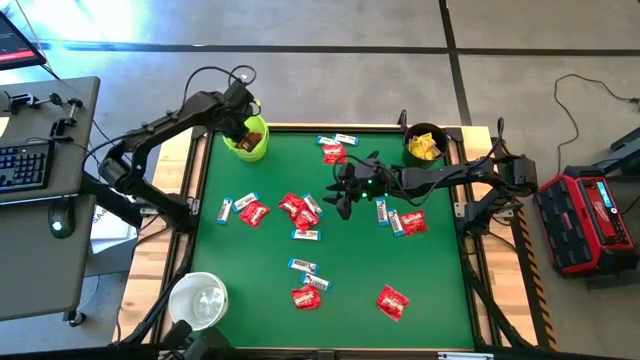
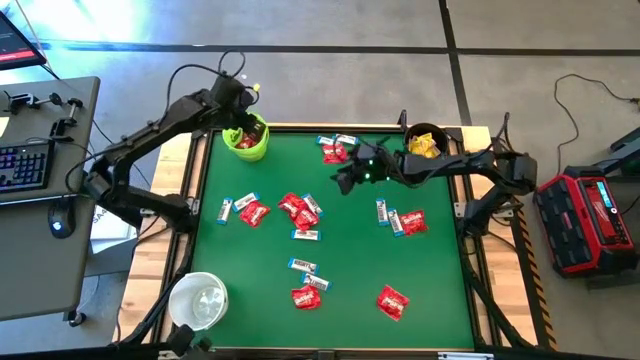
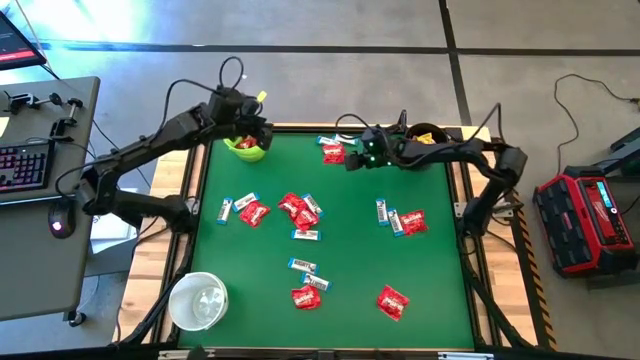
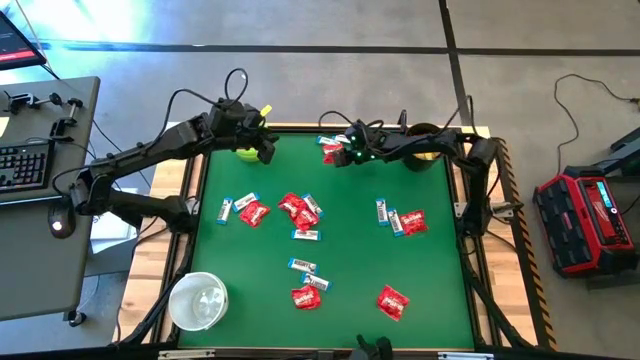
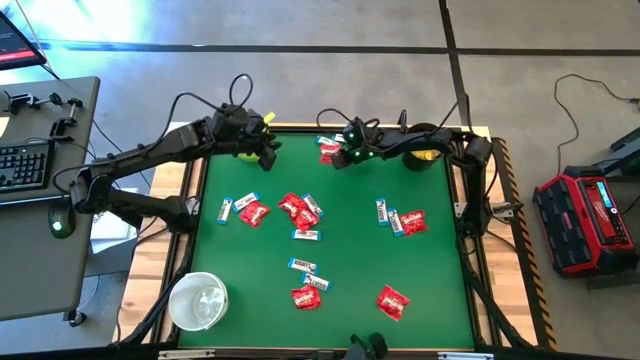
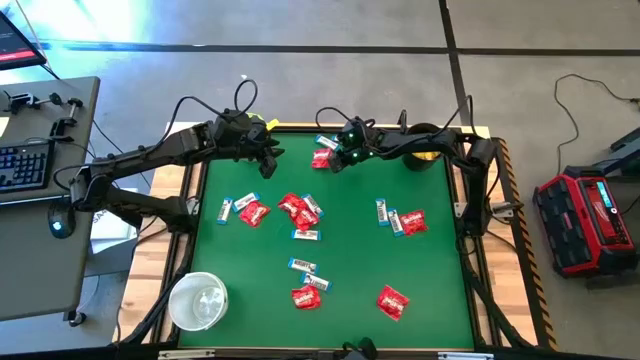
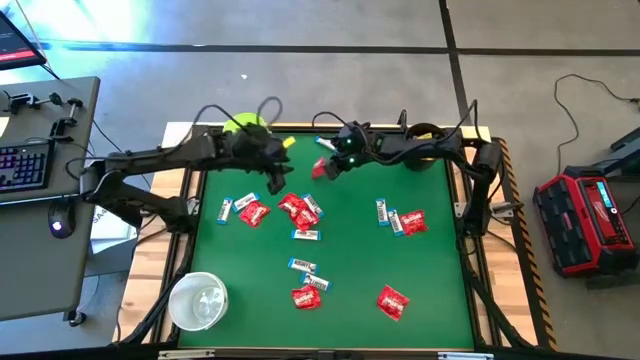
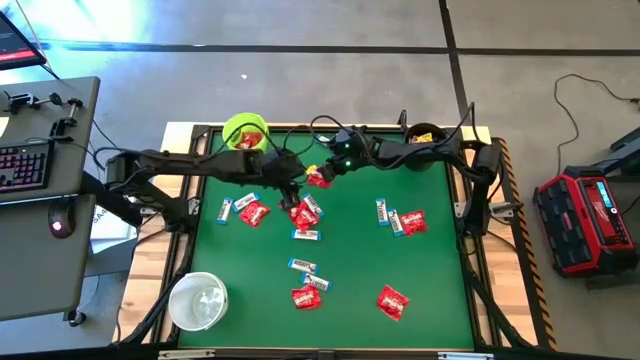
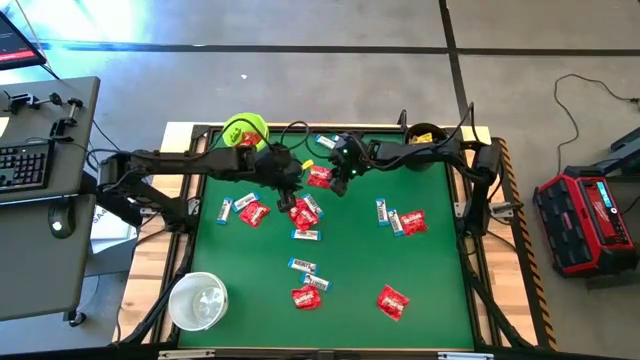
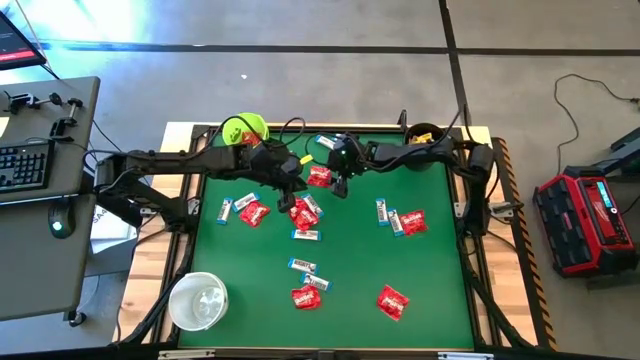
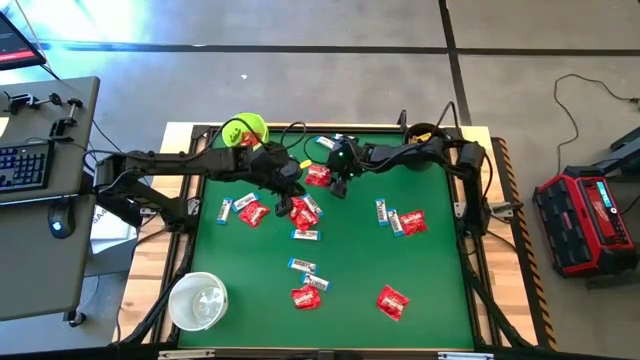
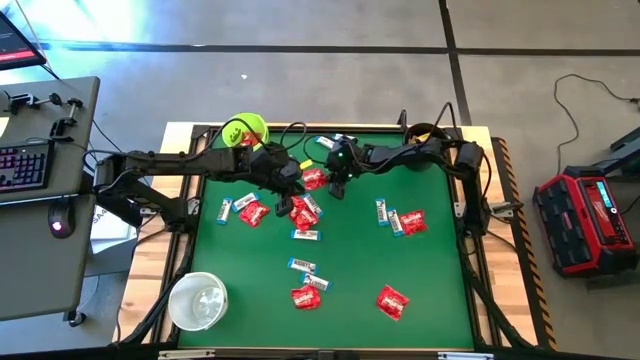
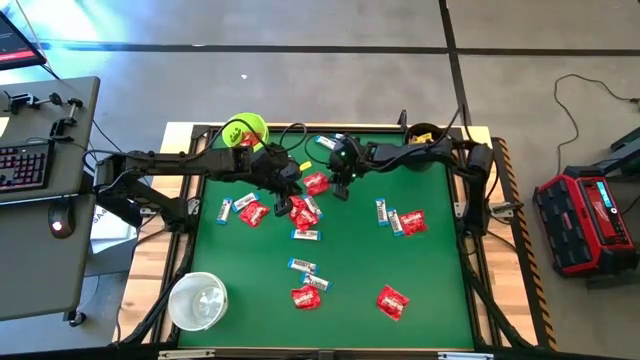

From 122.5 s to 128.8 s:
Task: Sort candy by brand, put in halloween buckets
Put the red candy into the green bucket

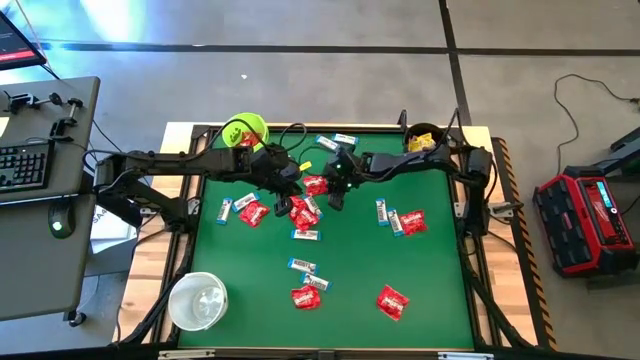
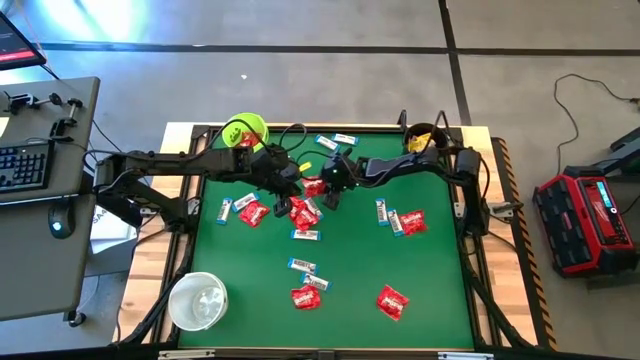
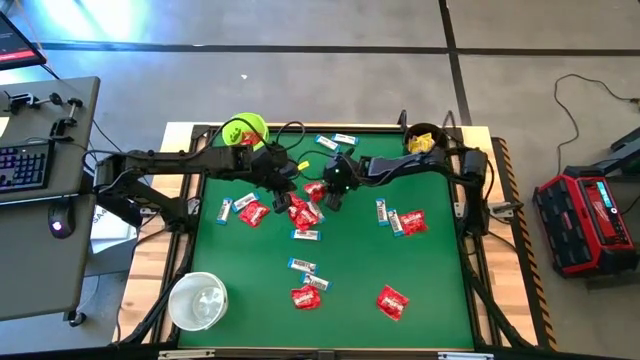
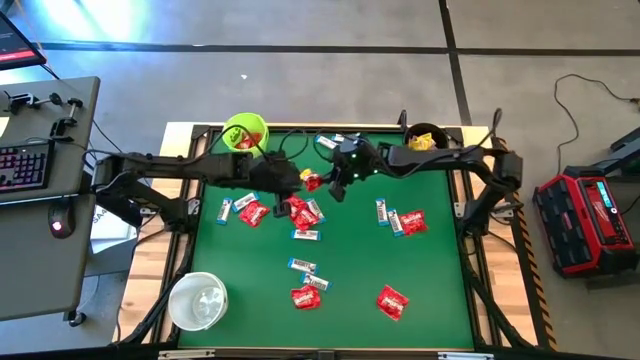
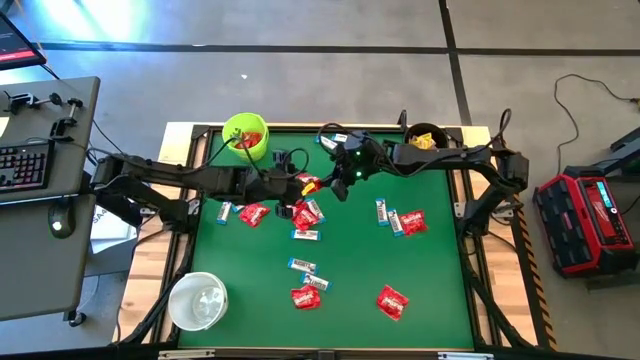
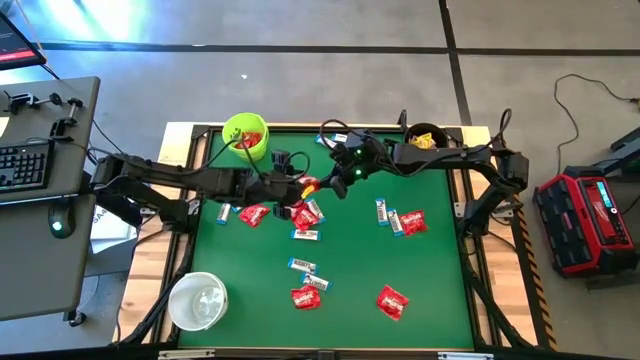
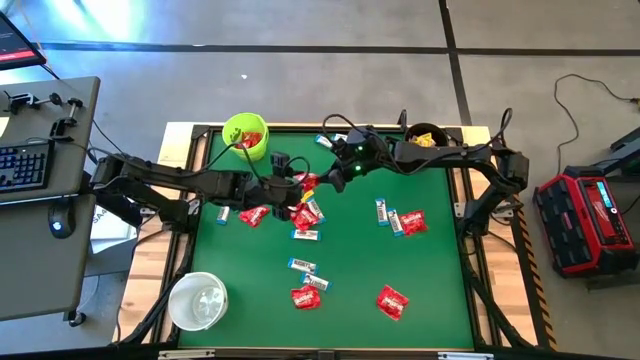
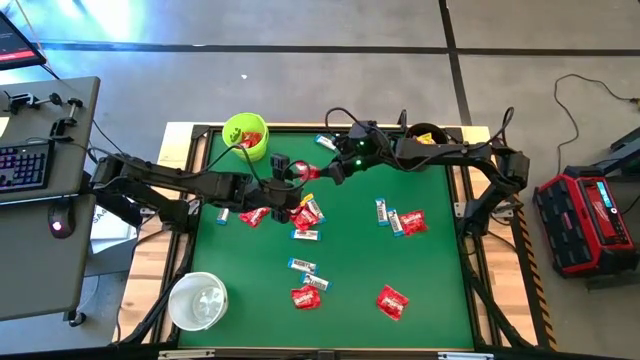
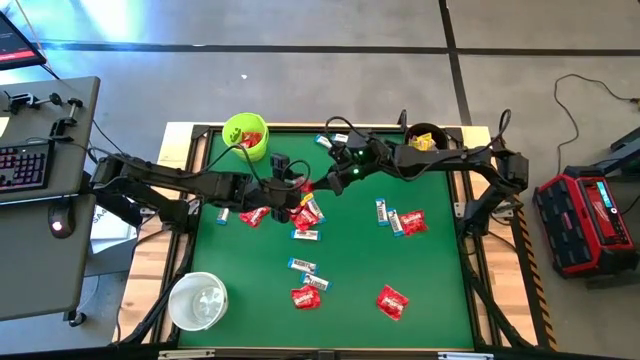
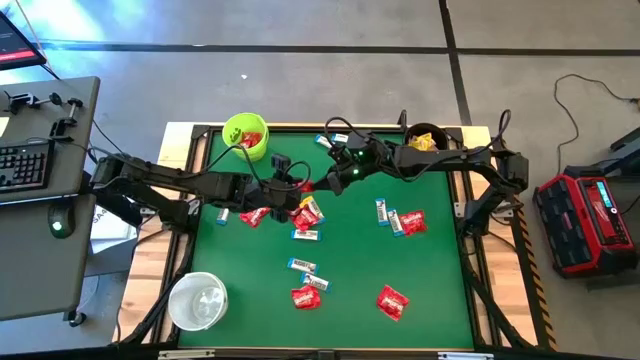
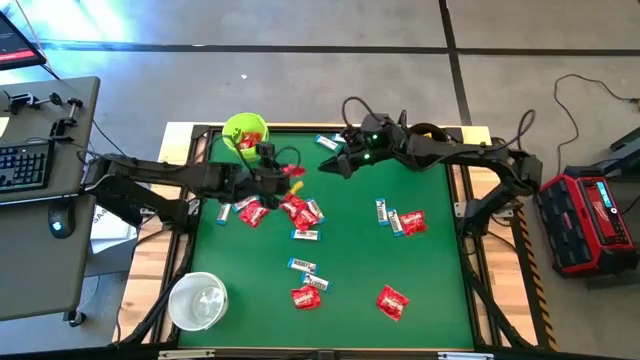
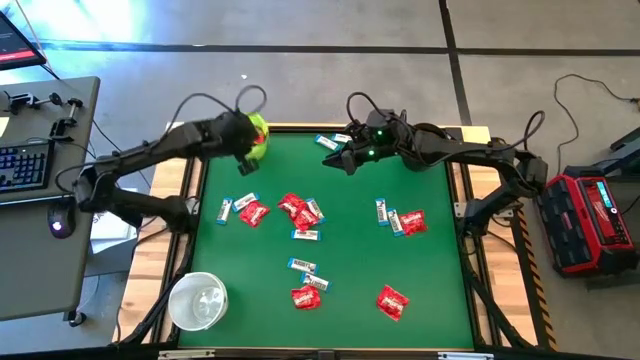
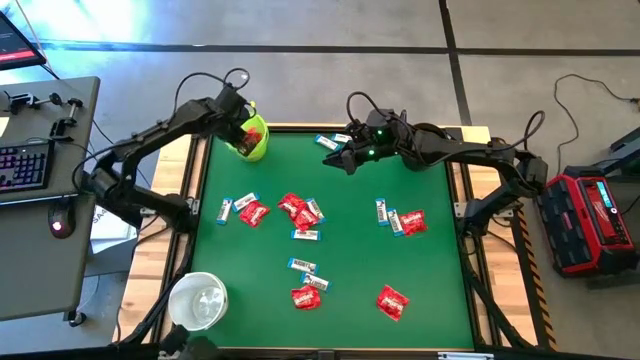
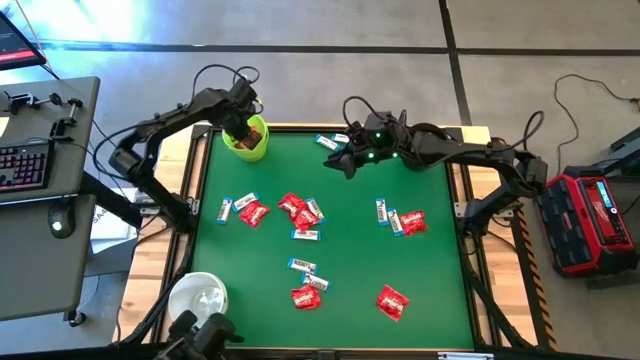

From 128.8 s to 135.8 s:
Put the red candy into the green bucket

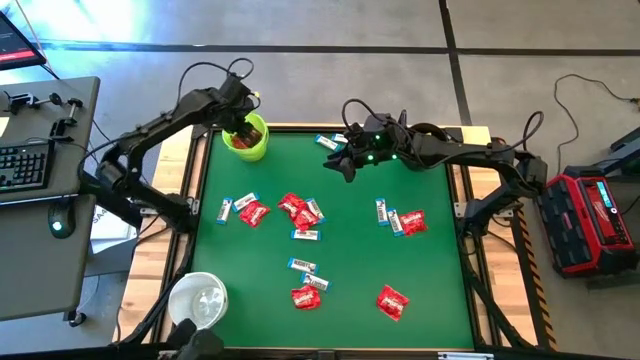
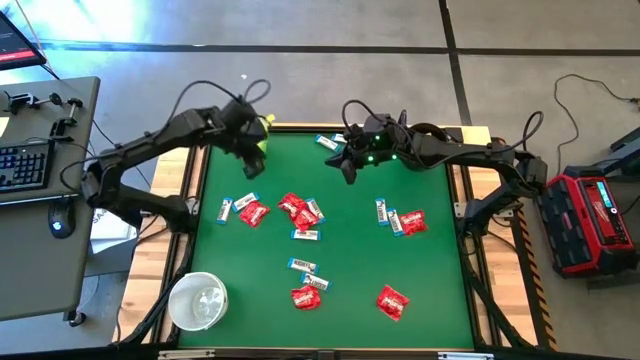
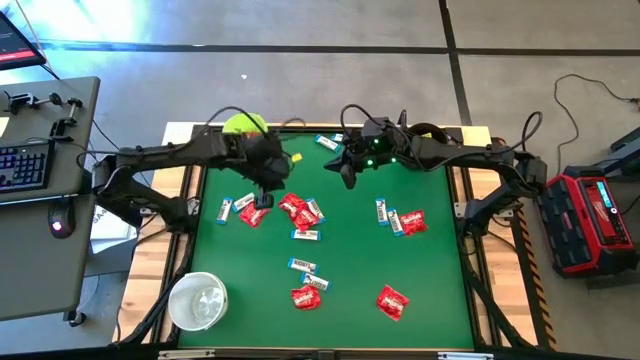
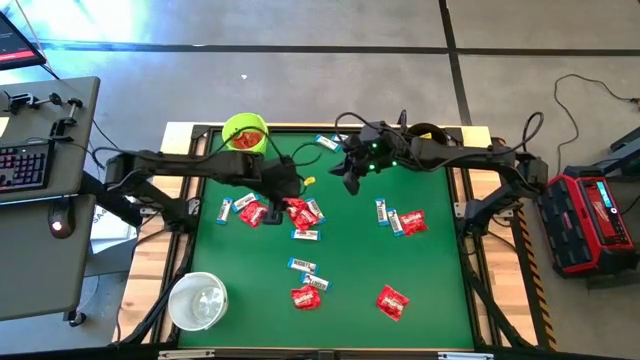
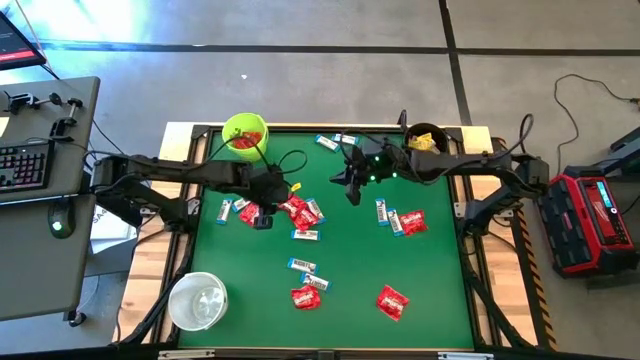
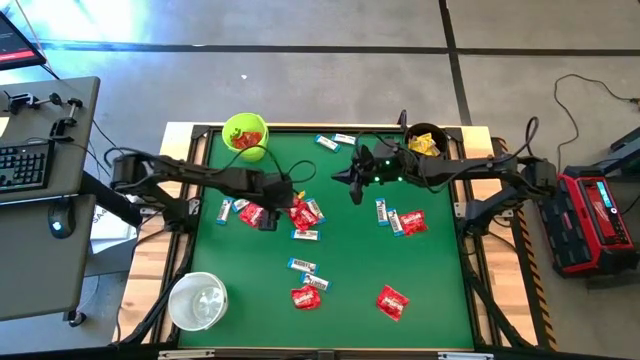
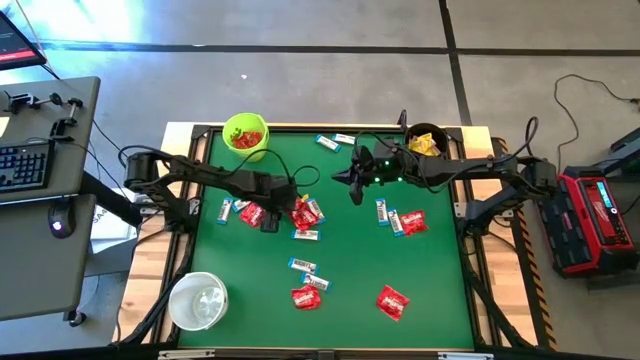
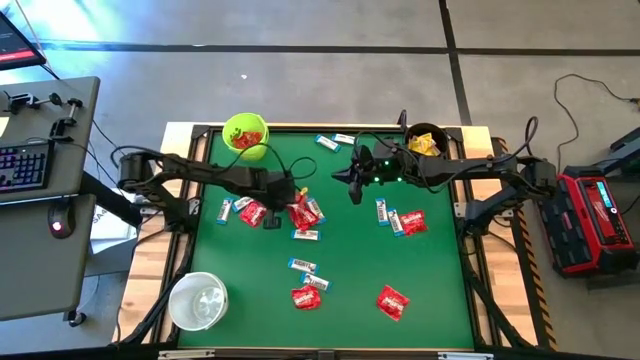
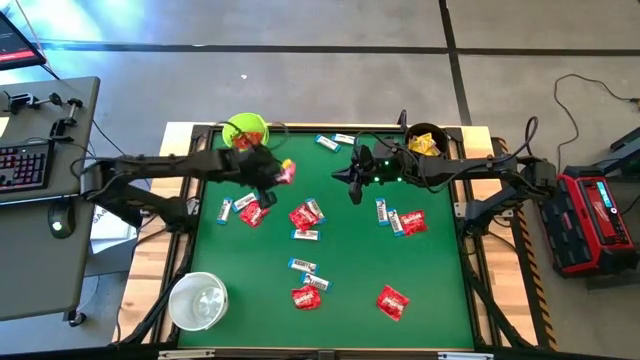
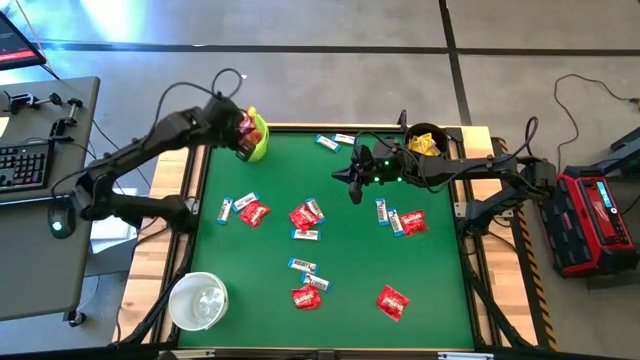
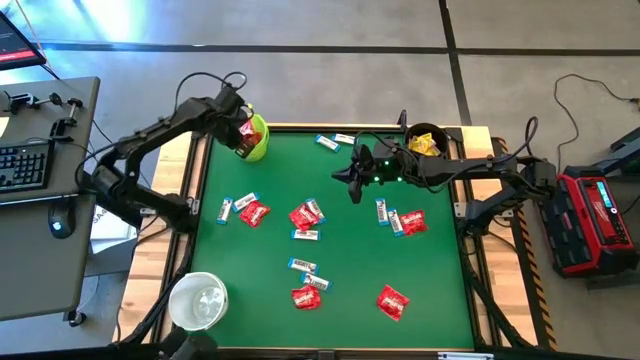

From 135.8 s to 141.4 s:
Put the red candy into the green bucket

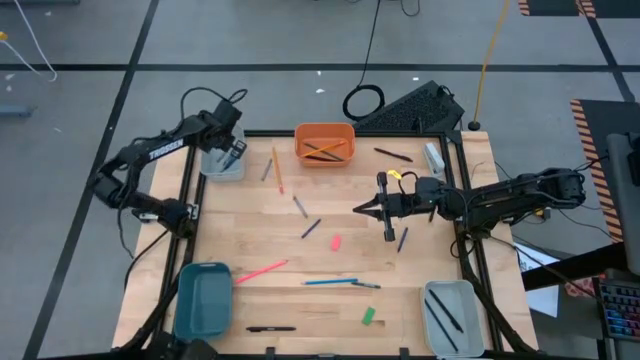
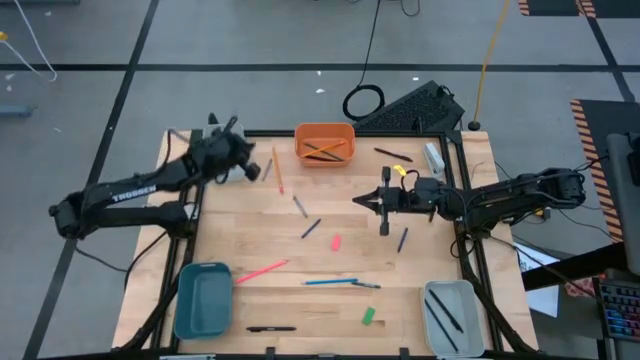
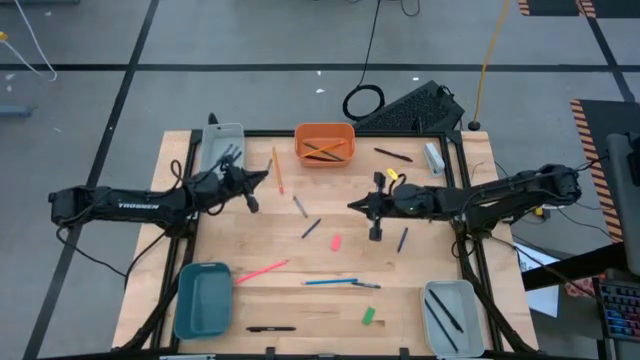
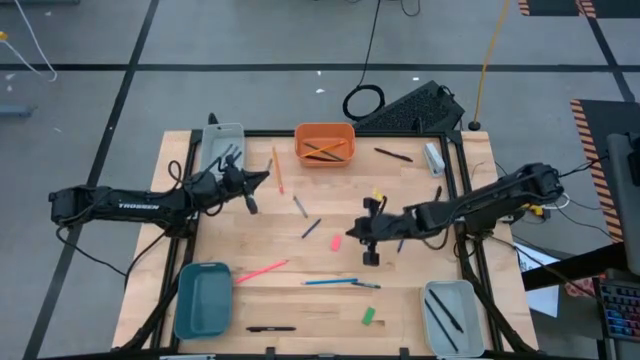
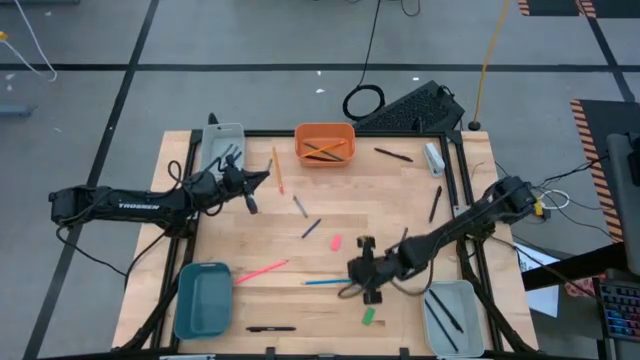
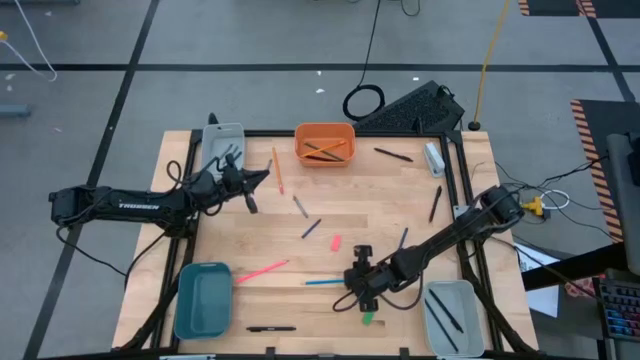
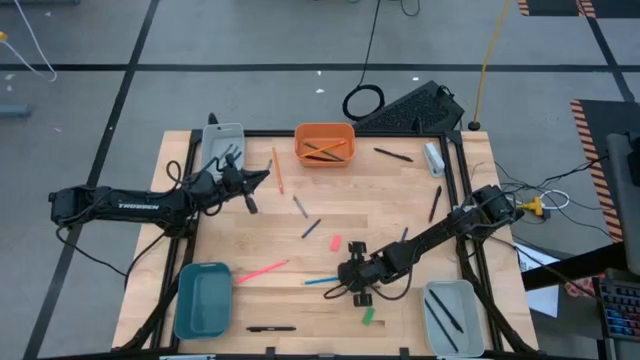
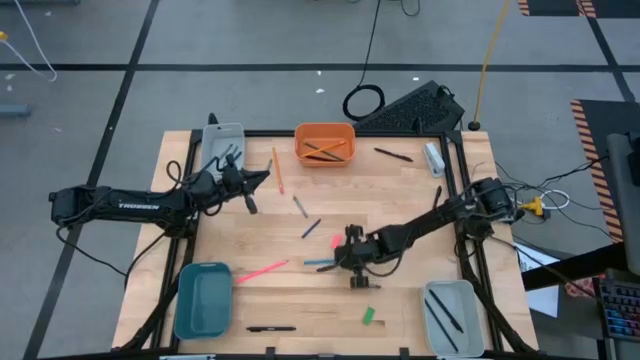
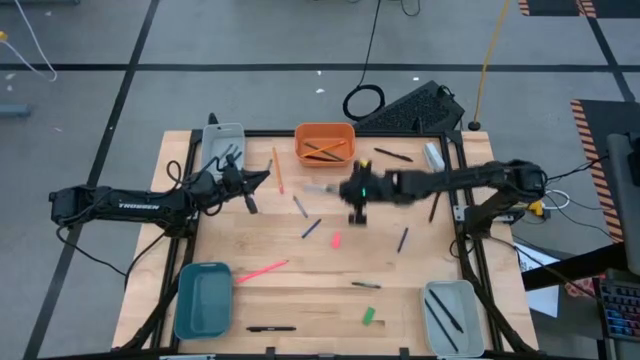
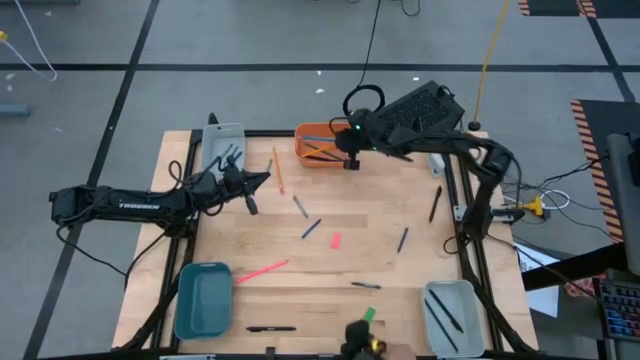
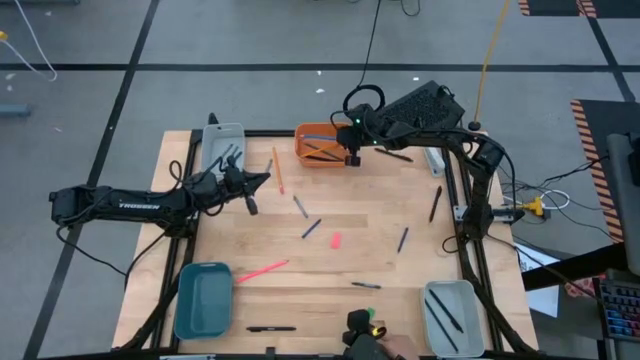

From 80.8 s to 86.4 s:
Task: Sort crayons/erasers/pens/pencils in bins
Put the blue pencil into the orange bin
